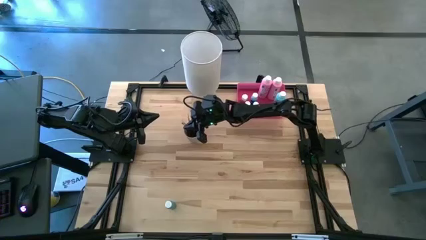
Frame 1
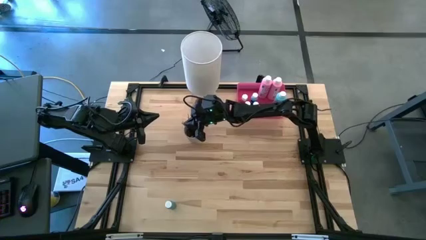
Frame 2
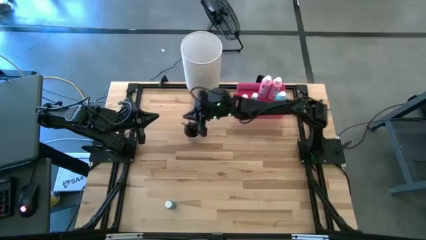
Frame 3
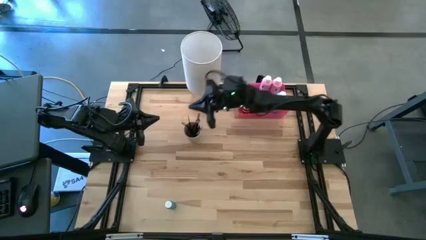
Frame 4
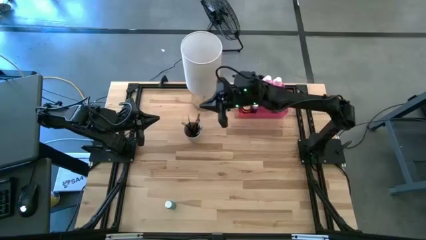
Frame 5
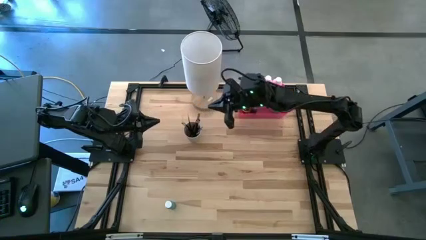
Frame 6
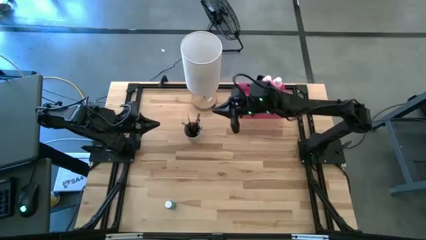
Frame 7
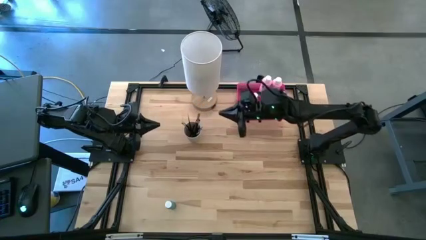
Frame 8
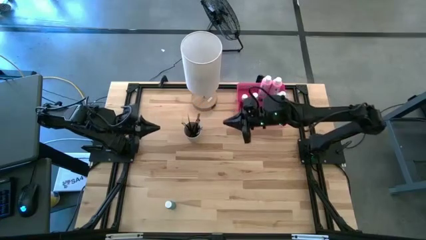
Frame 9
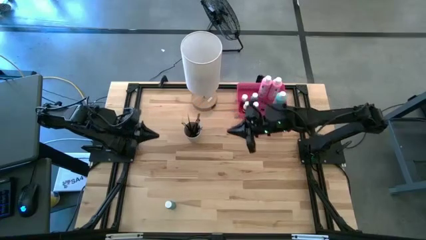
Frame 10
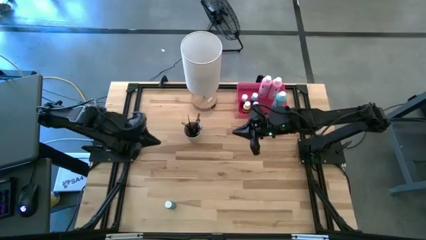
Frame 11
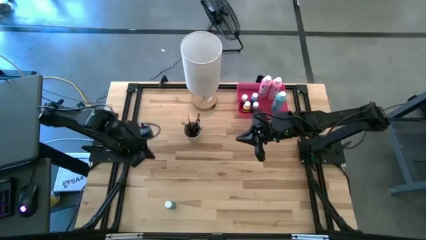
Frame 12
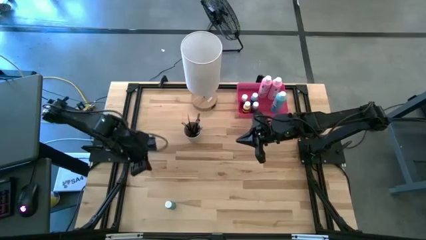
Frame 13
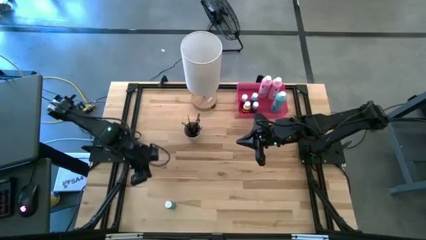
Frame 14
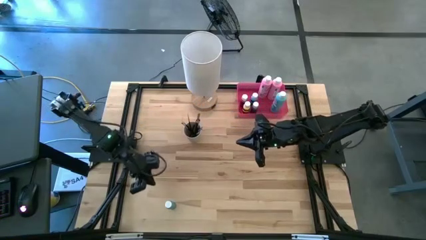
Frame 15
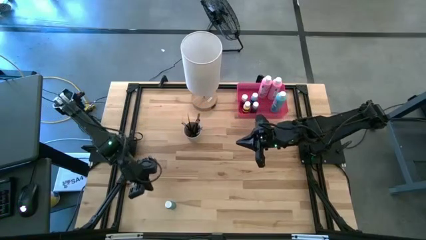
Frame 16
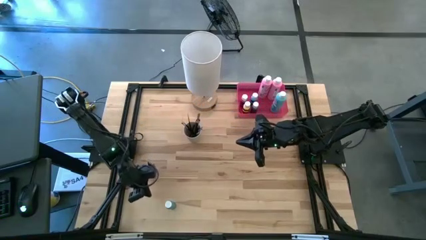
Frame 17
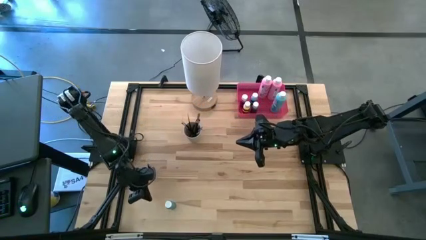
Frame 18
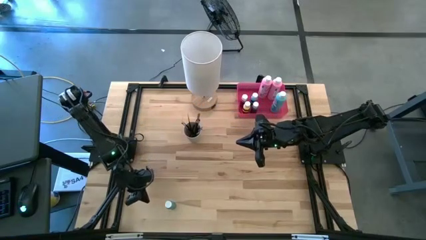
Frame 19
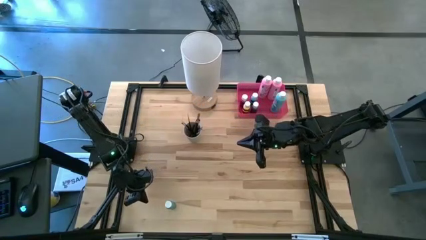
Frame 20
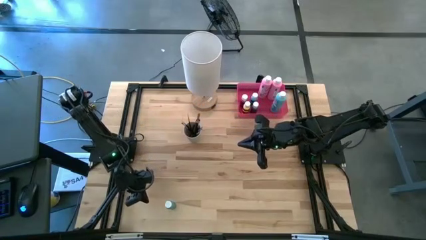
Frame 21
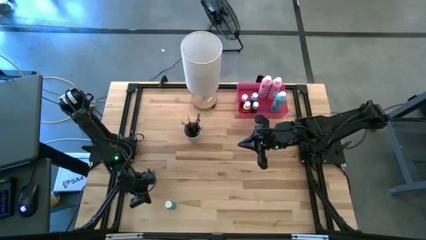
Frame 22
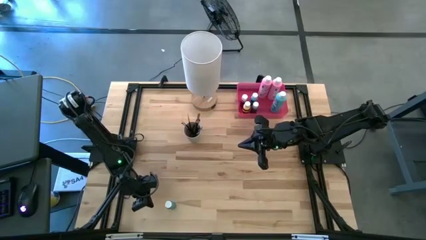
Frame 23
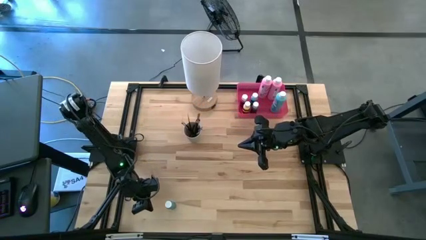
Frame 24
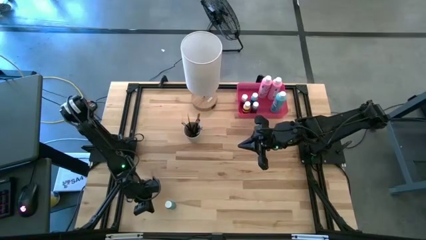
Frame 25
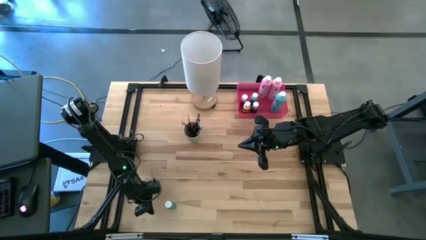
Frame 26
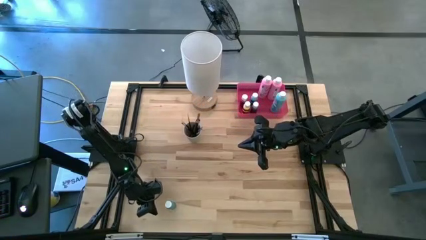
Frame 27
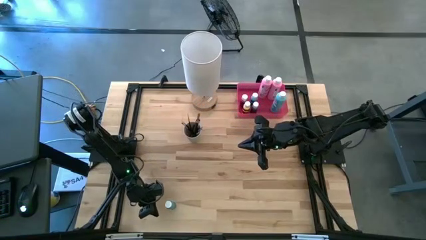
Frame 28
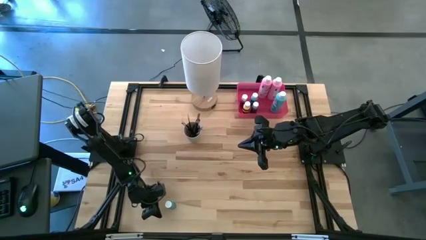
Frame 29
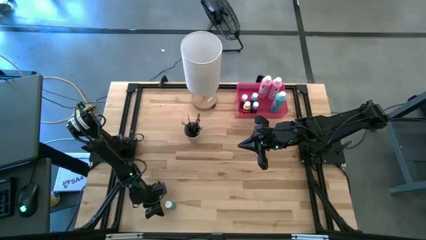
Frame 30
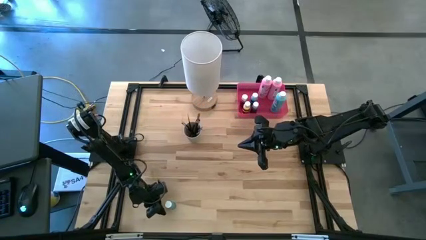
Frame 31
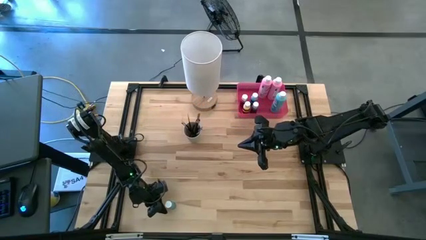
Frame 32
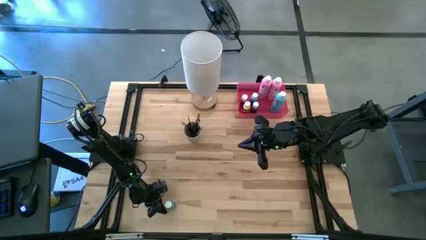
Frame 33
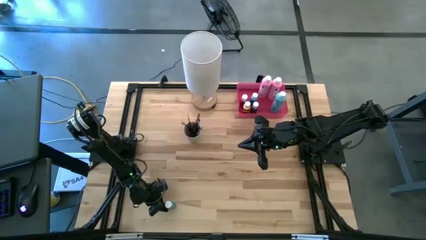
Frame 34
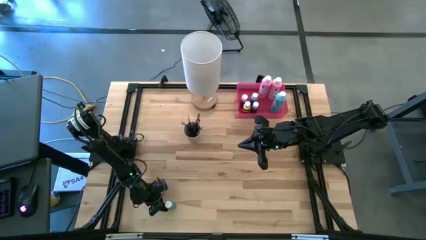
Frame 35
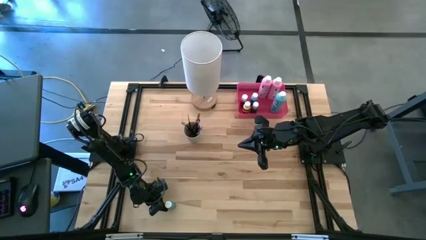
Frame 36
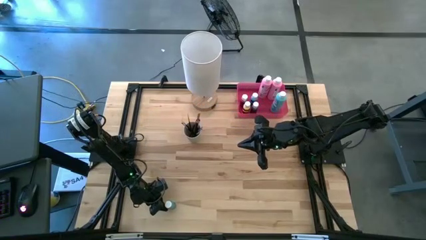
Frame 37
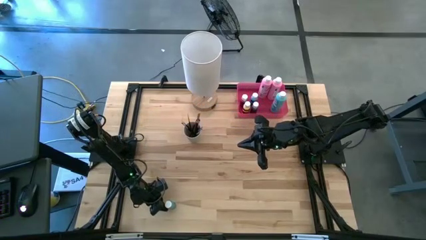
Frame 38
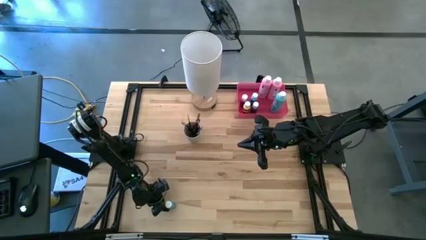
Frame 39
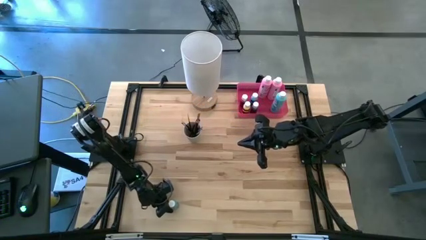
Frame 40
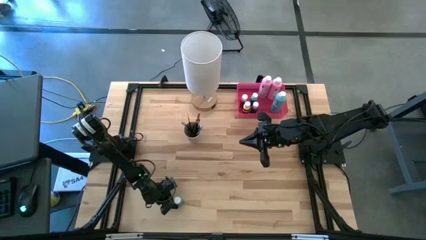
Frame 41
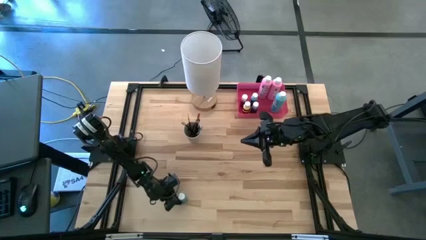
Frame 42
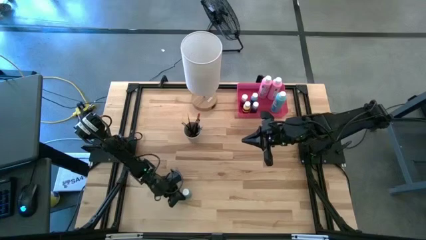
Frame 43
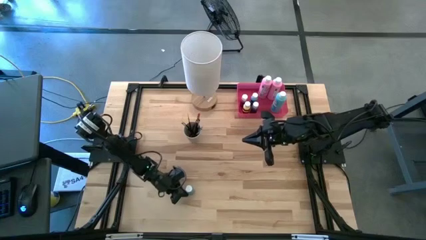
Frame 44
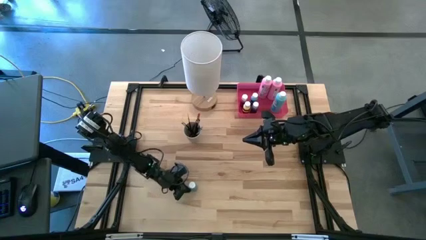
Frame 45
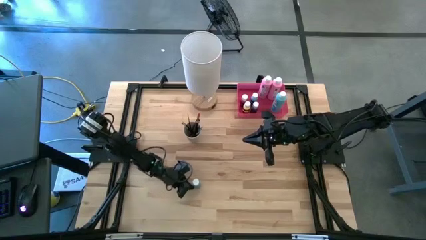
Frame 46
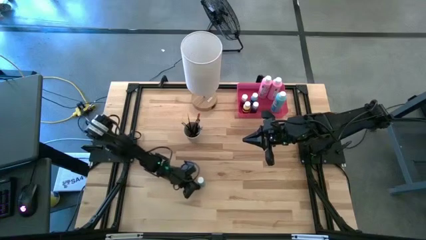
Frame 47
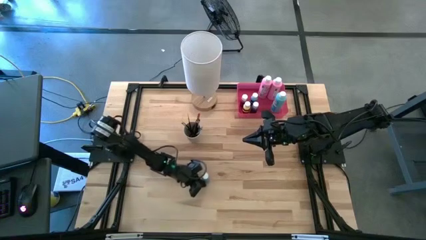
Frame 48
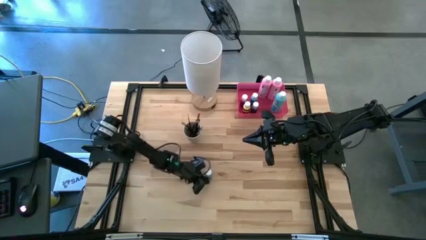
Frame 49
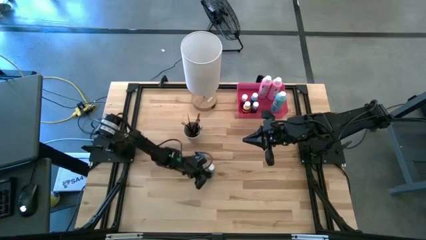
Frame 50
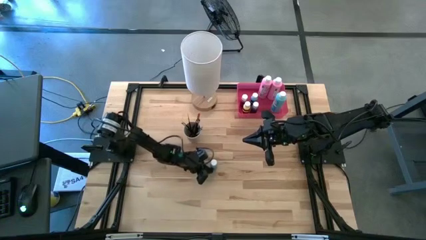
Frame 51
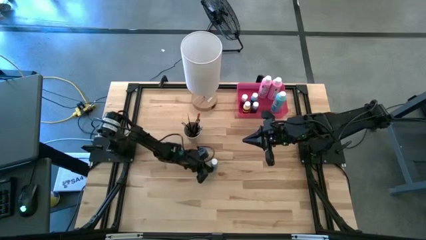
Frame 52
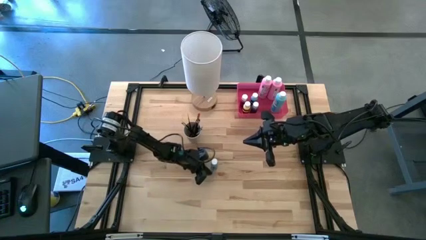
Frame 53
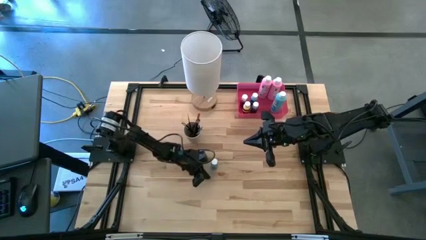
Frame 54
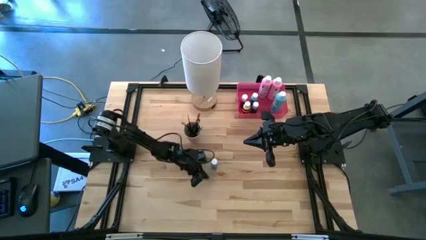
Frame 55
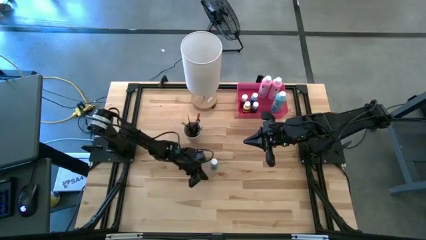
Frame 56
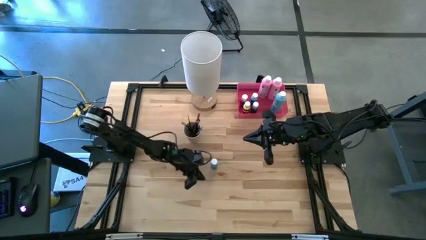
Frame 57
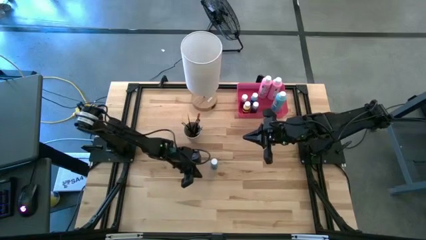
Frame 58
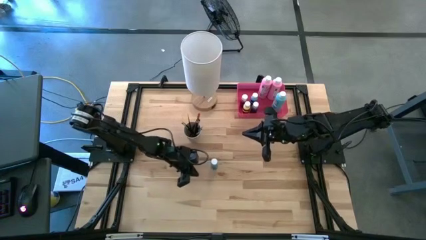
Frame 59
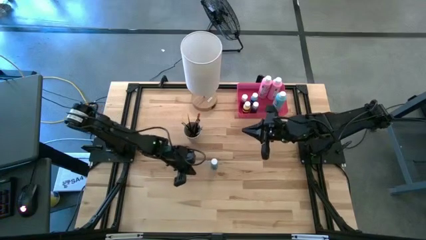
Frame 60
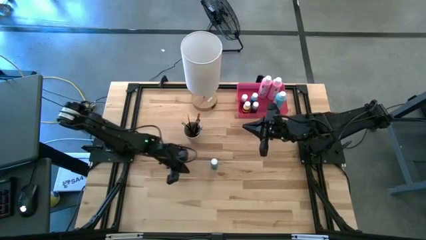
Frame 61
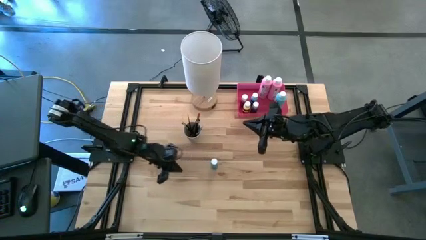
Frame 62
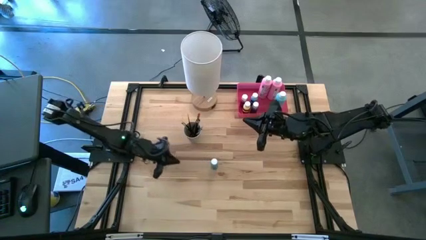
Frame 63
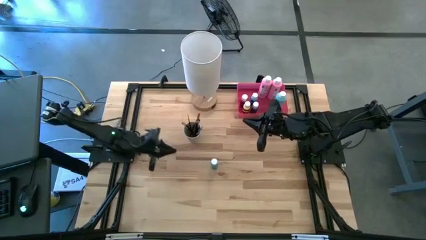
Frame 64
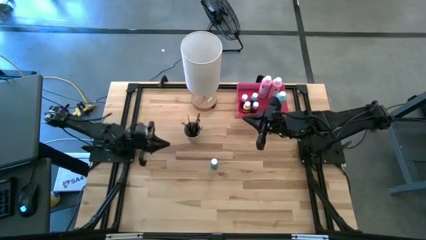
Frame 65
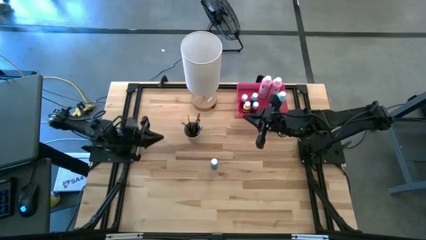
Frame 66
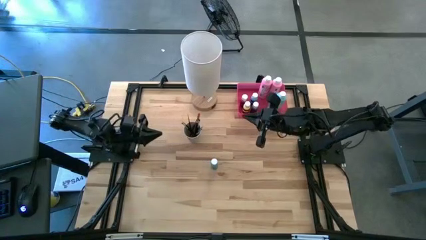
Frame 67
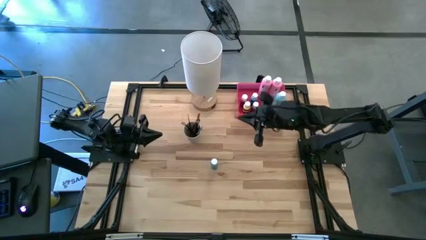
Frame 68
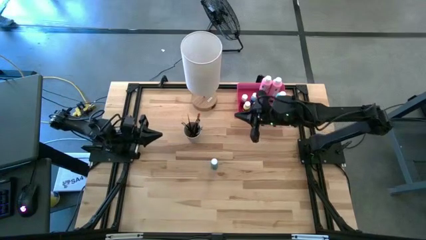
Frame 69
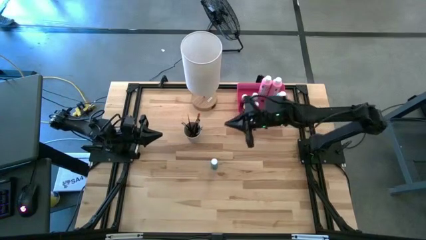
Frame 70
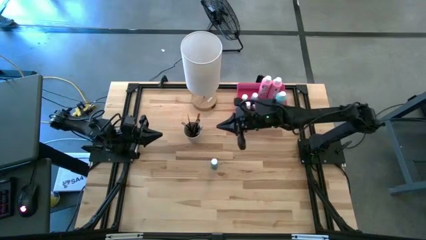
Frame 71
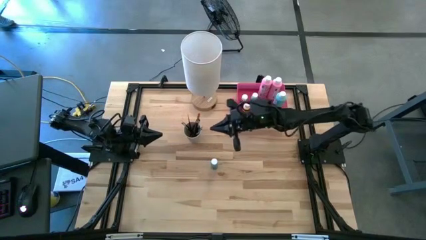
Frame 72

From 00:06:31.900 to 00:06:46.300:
Task: Pick & Place Paint Supplies
Put the small blue paint bottle into the pink bin
